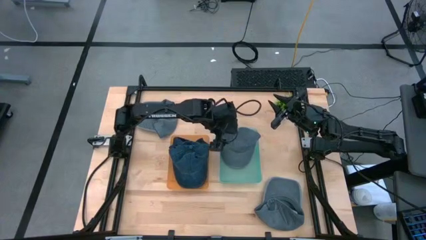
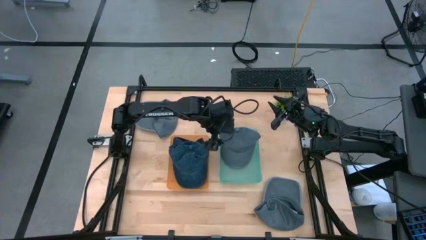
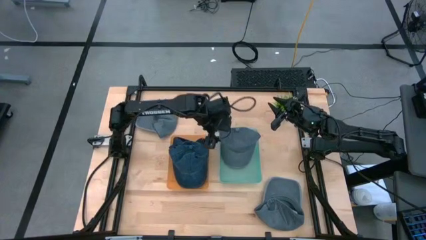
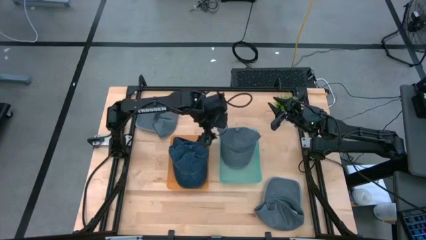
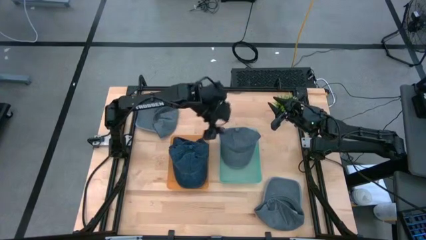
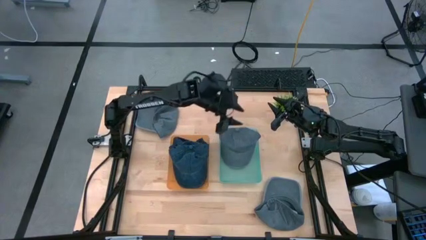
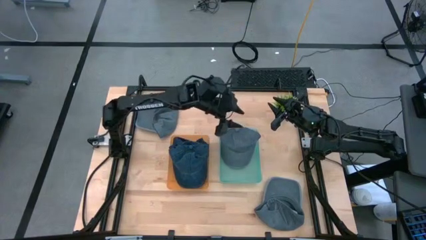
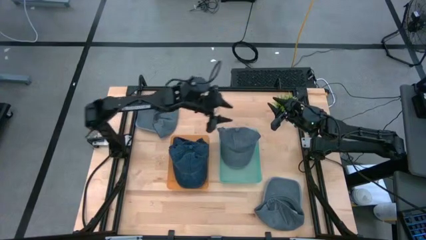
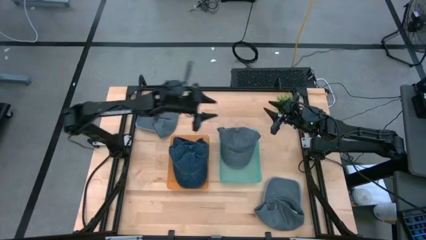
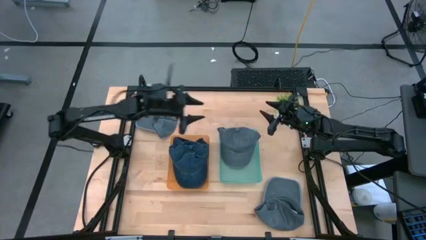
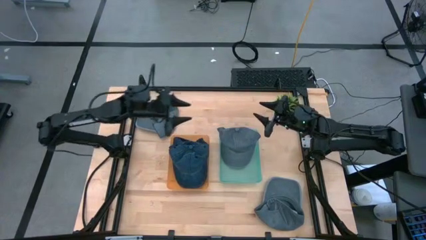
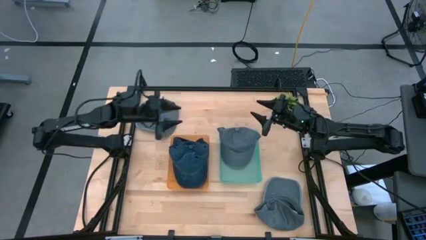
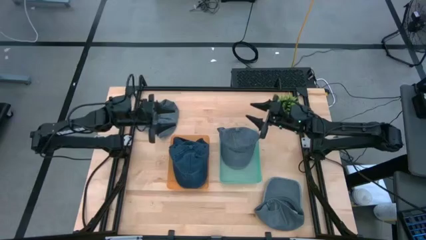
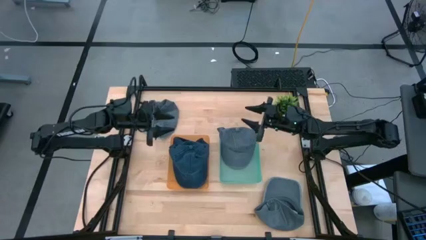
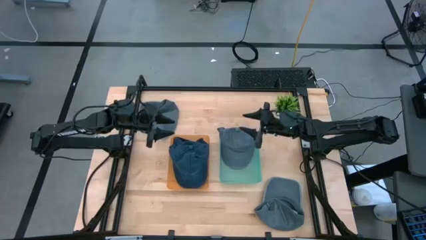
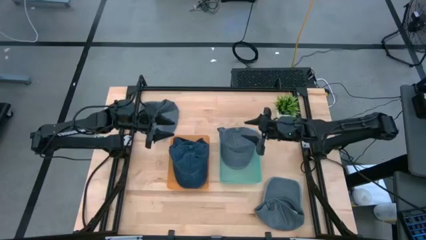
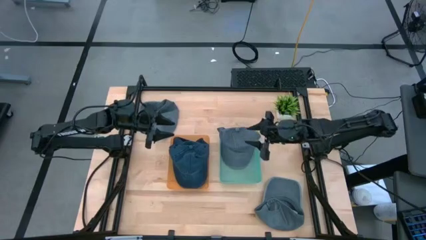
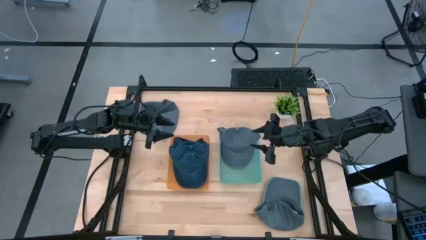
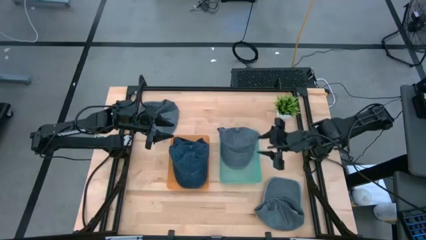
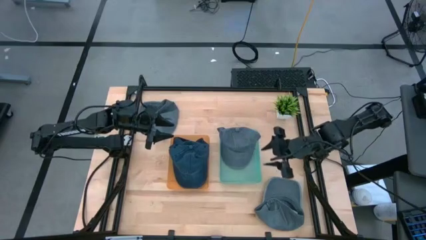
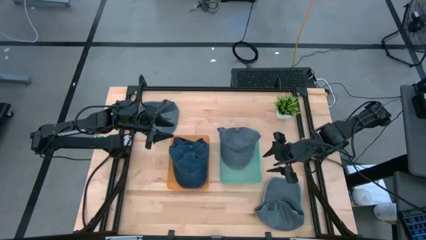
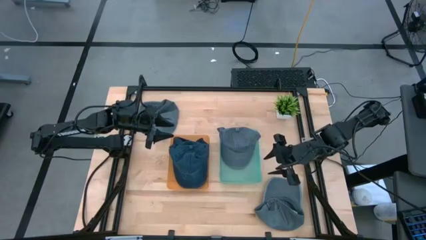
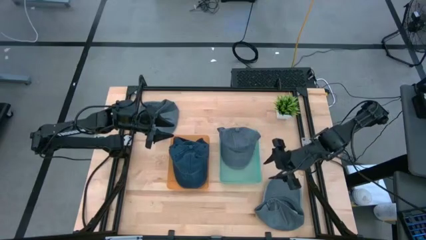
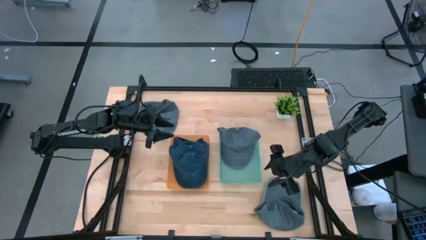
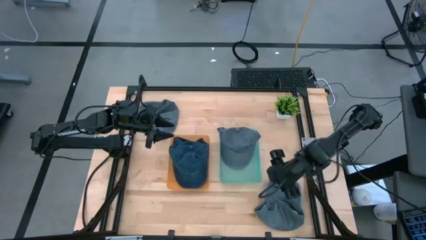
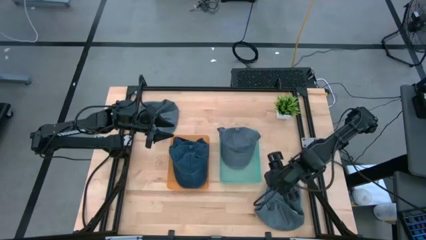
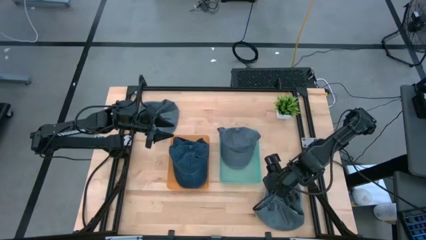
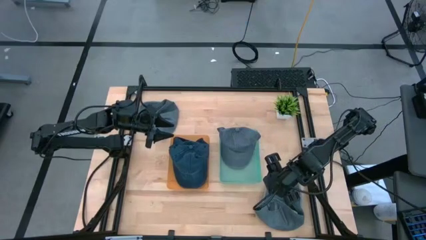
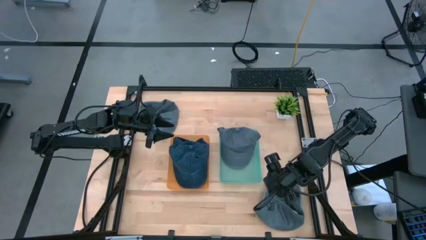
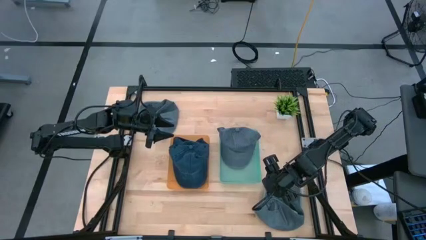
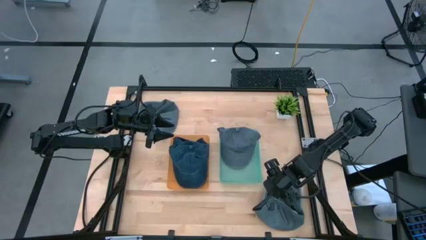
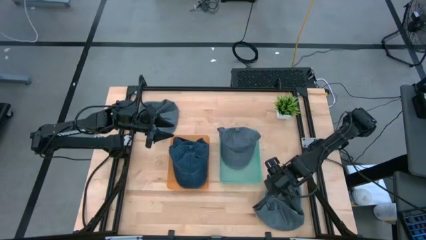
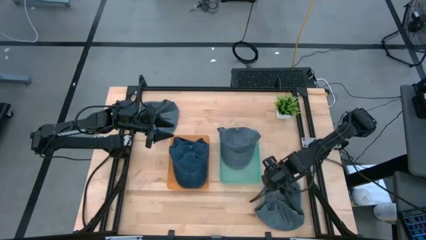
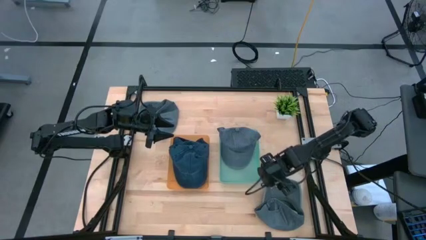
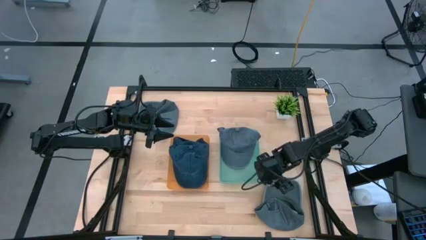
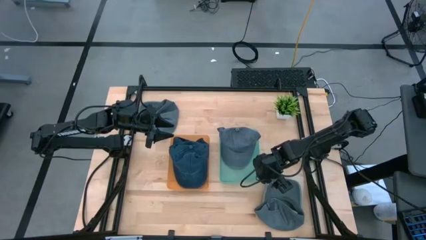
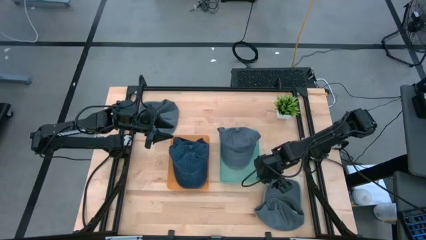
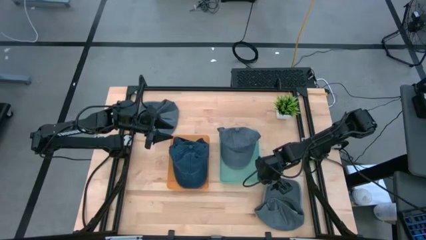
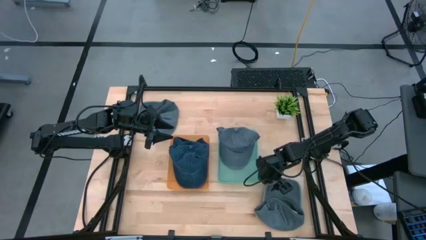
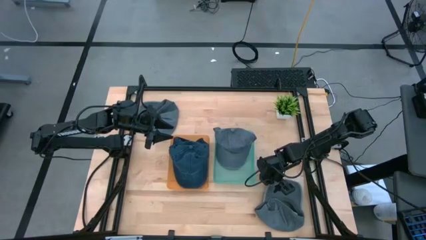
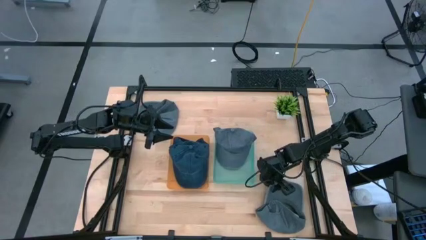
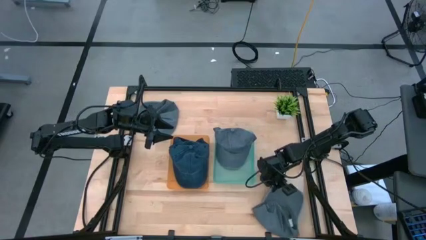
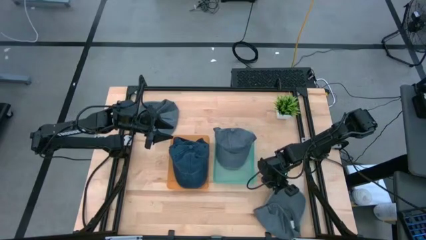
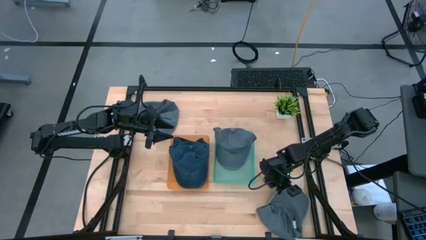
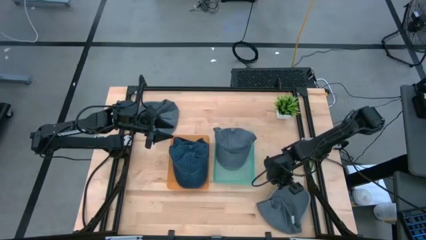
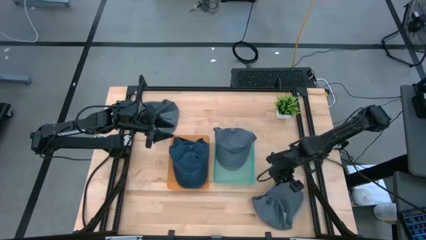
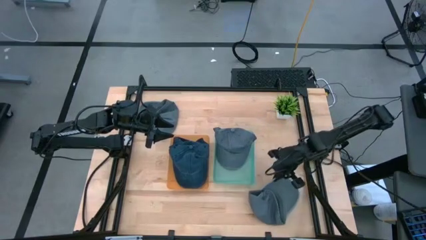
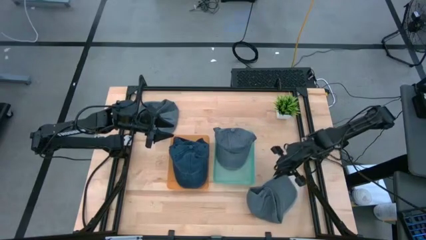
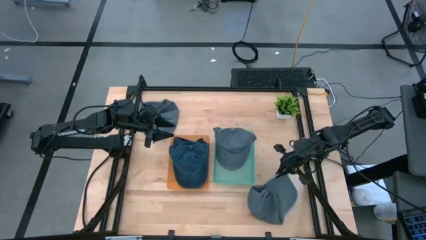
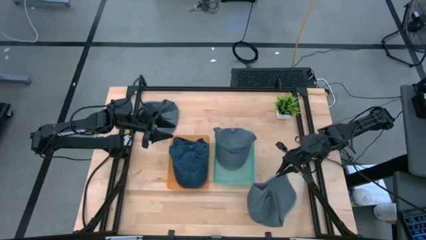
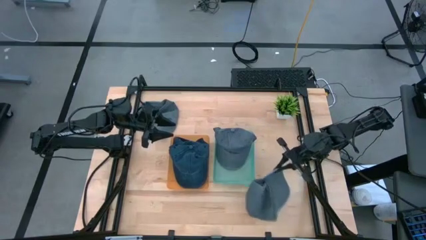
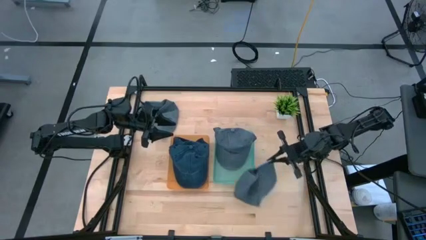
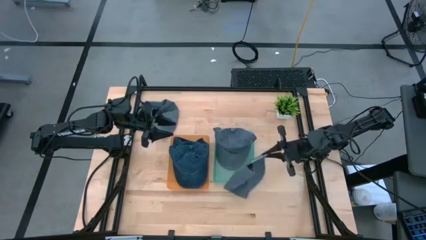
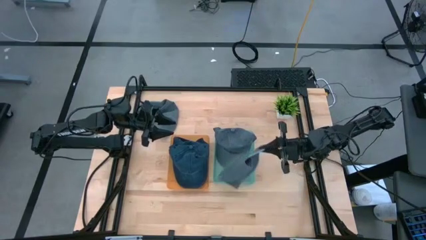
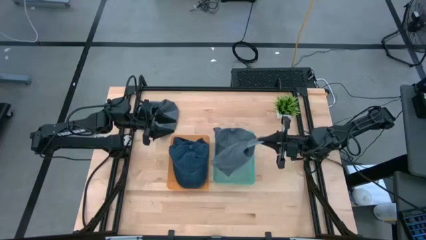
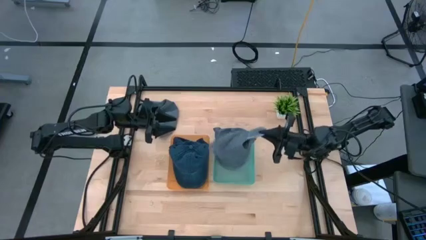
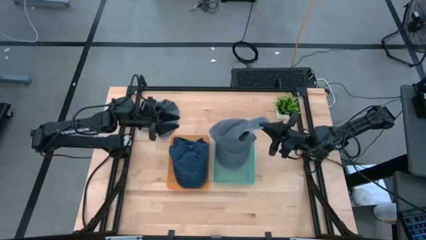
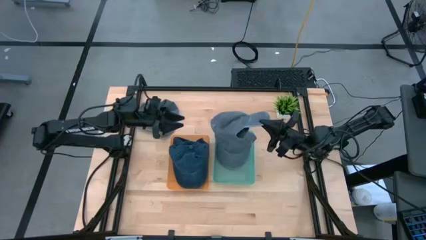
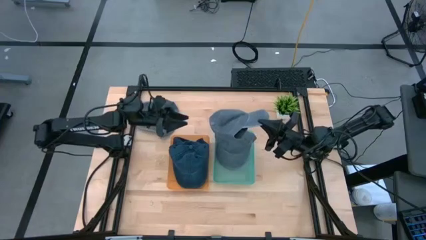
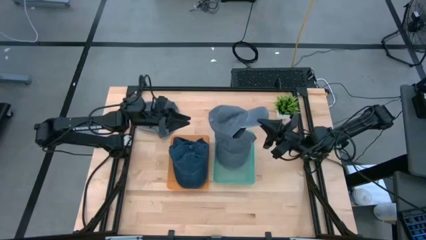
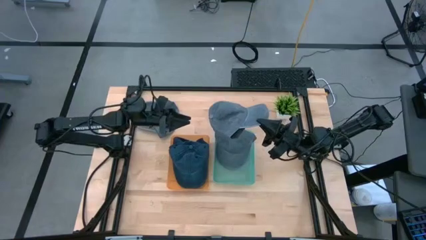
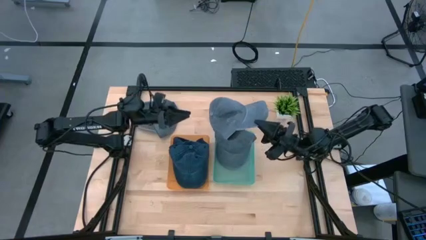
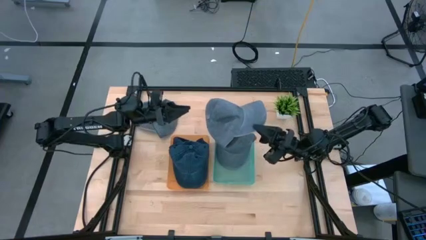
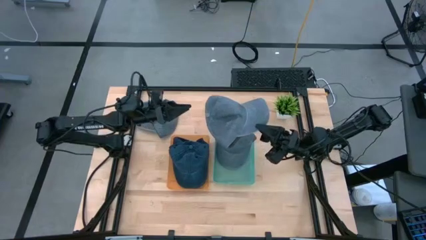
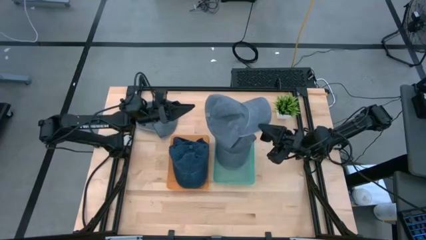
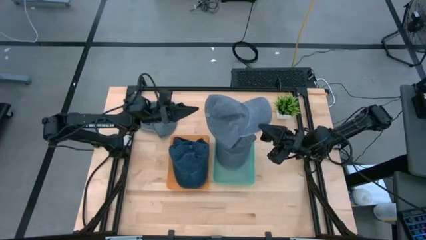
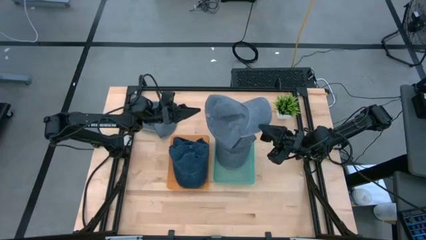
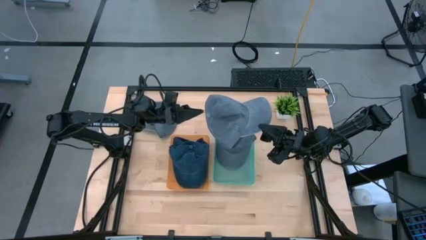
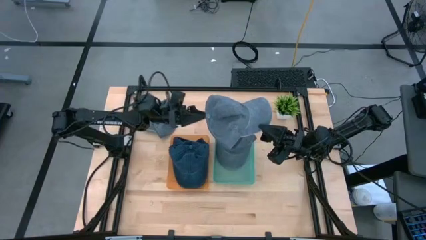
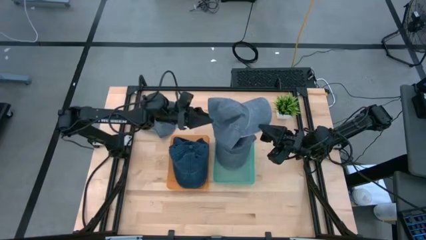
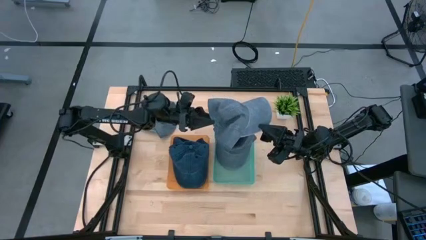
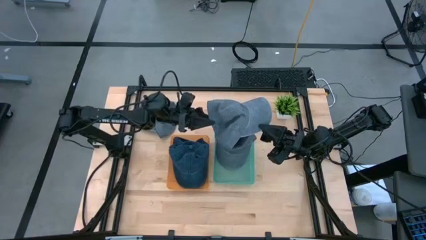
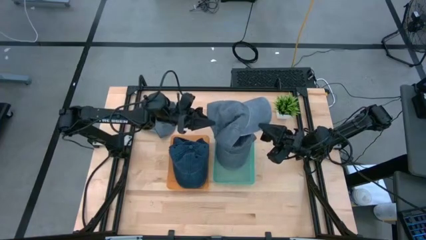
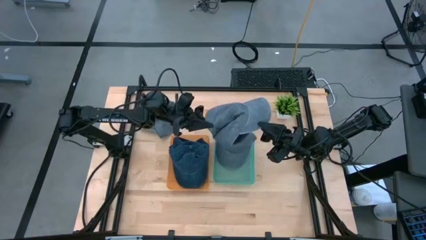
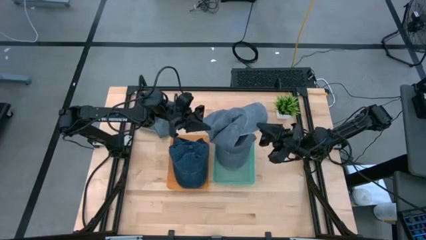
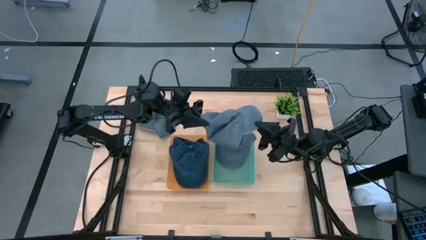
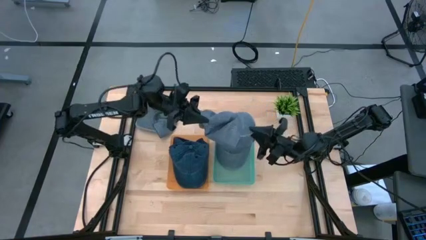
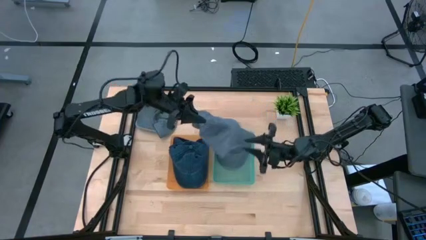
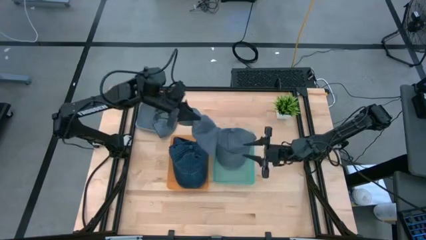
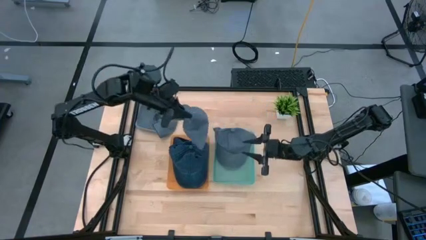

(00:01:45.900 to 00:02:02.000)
Task: Pick & Place hat
Put the bottom gray cap into the green bin

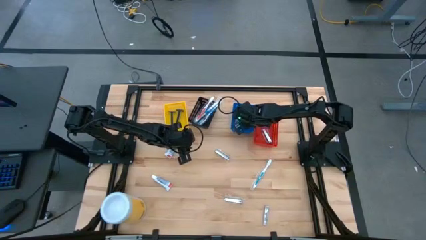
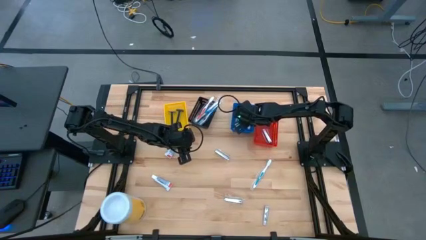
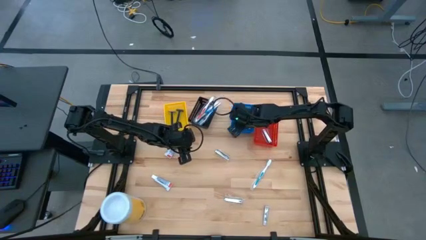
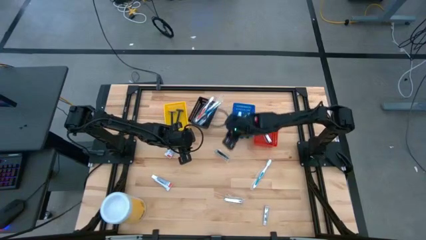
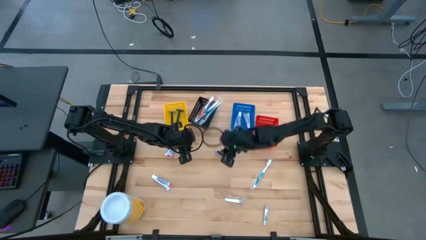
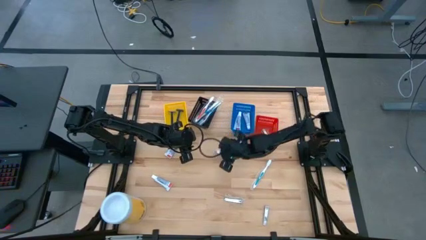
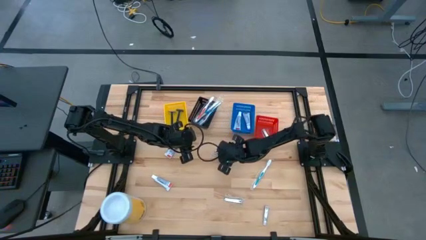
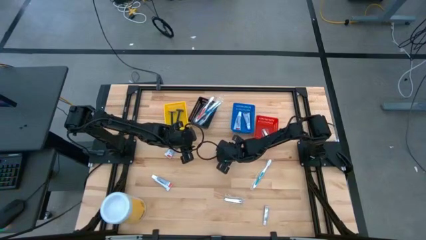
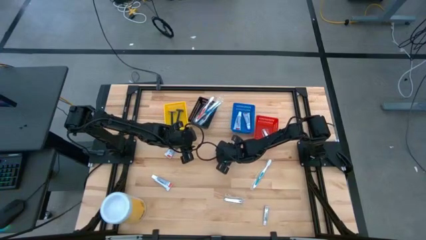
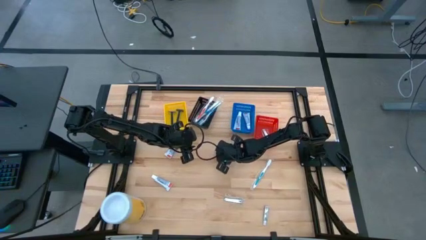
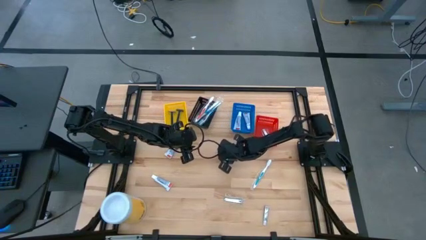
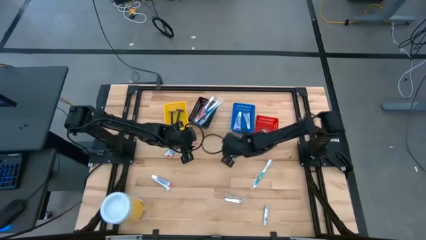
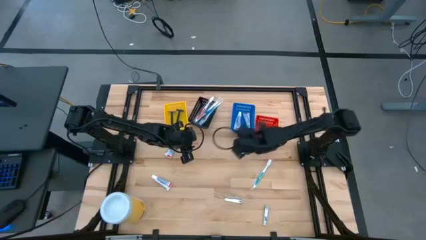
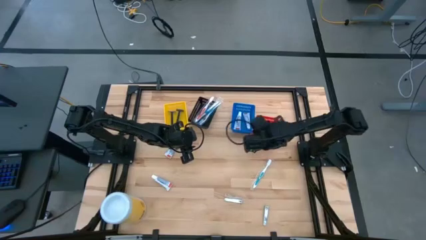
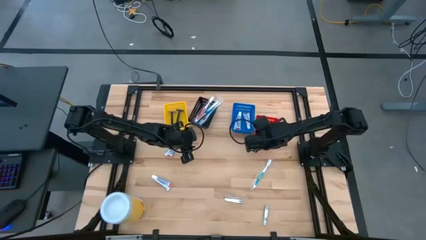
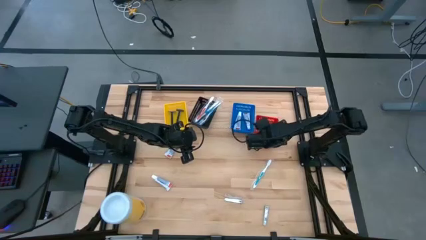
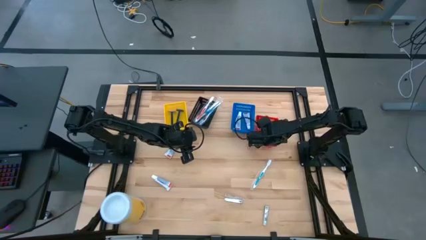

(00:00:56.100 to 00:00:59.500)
Task: Pick & Place Travel size toiletries
Put the silver nail cutter into the red bin
